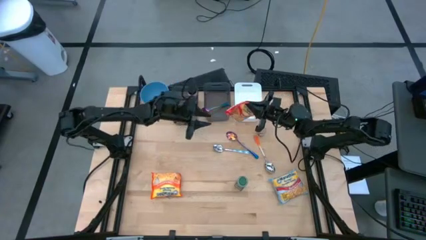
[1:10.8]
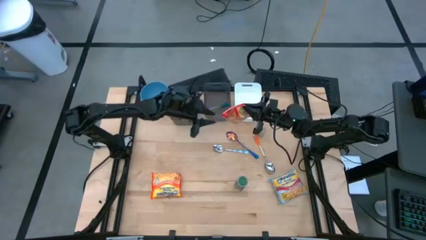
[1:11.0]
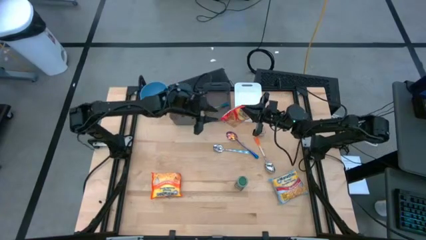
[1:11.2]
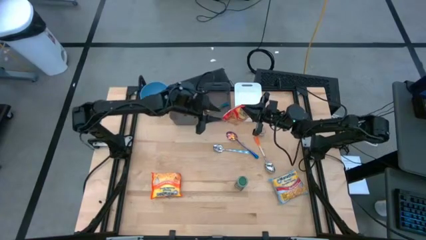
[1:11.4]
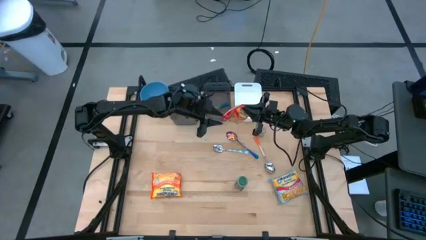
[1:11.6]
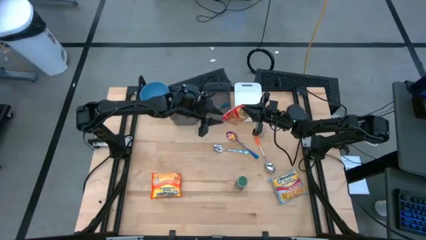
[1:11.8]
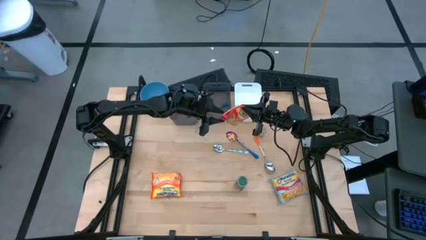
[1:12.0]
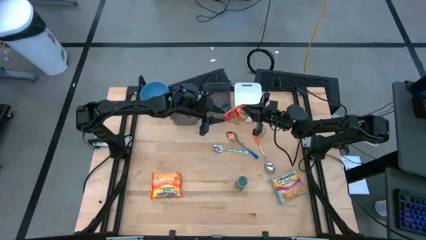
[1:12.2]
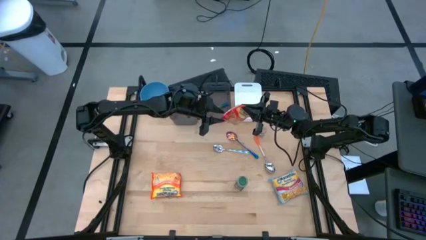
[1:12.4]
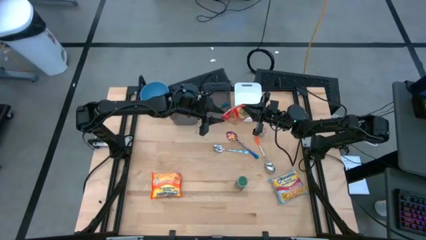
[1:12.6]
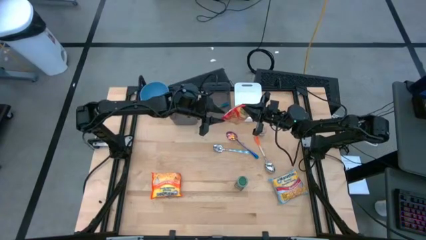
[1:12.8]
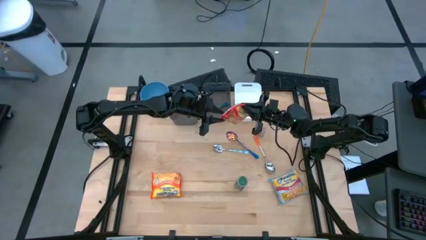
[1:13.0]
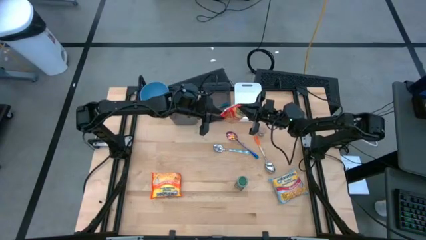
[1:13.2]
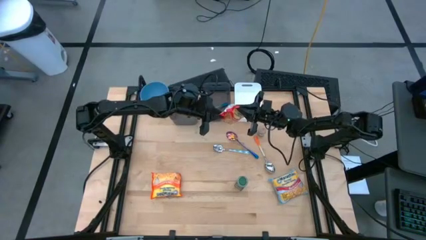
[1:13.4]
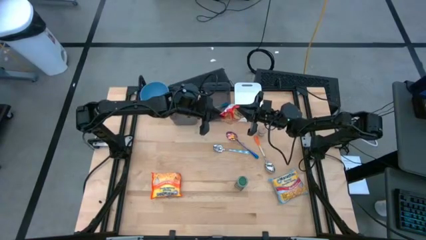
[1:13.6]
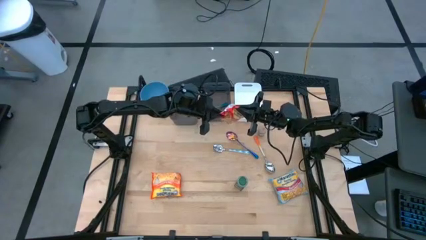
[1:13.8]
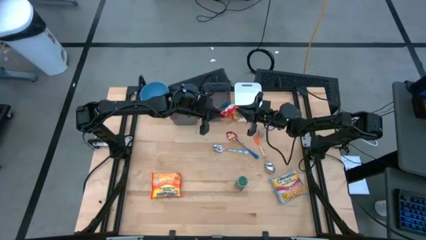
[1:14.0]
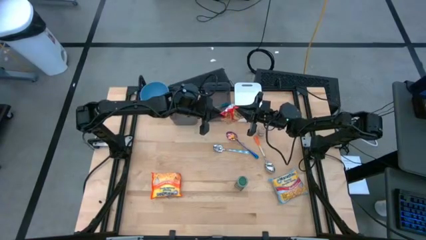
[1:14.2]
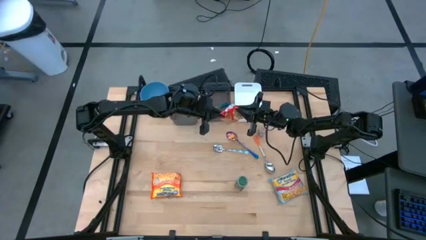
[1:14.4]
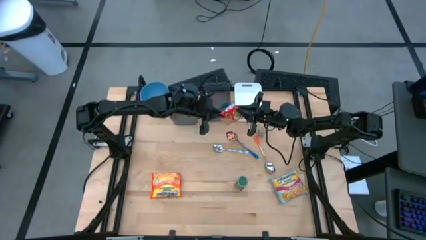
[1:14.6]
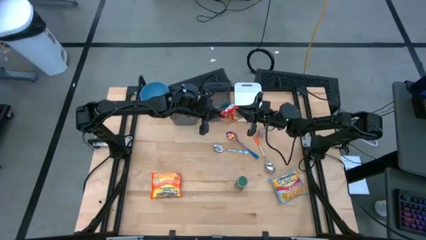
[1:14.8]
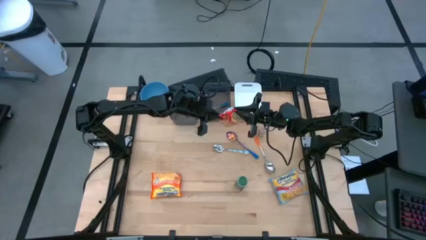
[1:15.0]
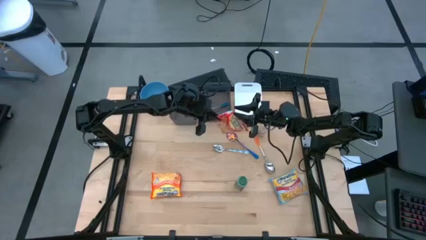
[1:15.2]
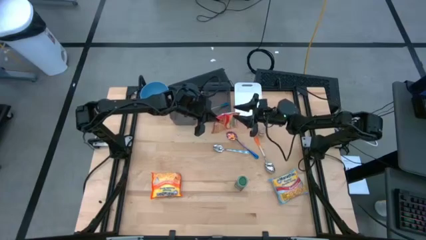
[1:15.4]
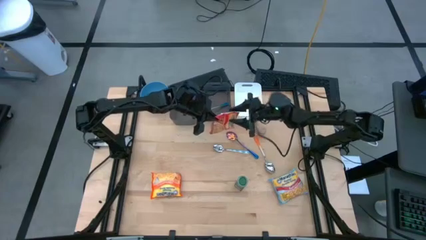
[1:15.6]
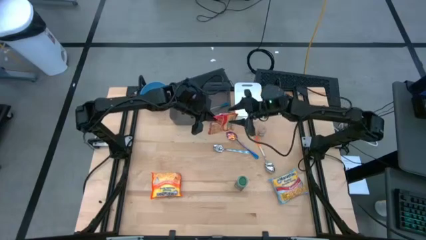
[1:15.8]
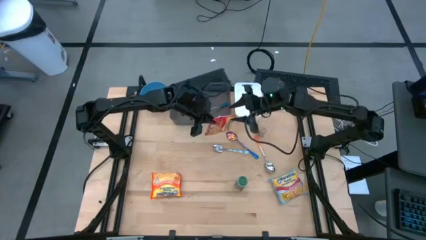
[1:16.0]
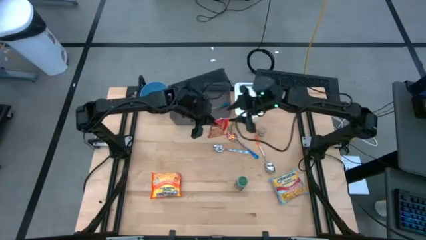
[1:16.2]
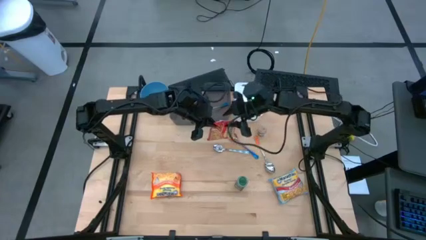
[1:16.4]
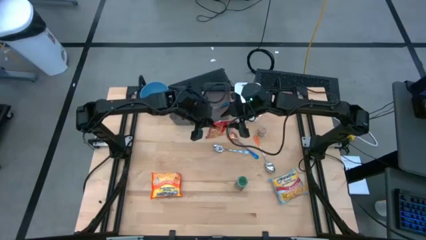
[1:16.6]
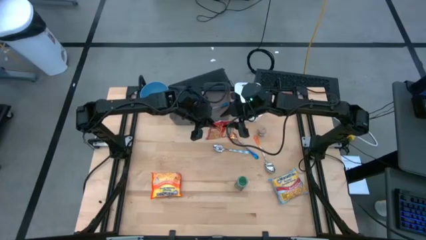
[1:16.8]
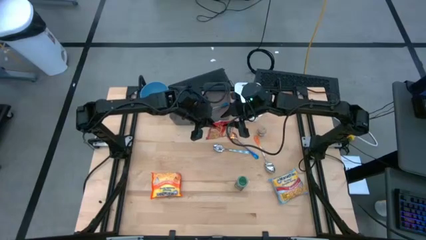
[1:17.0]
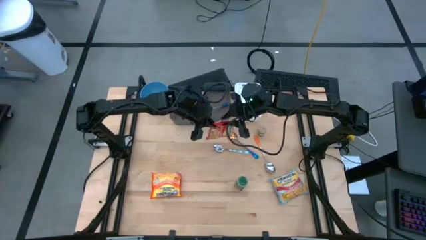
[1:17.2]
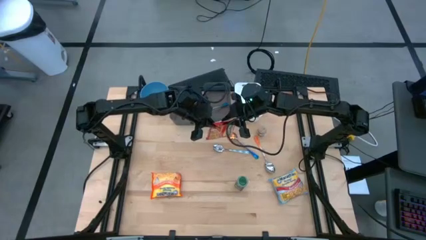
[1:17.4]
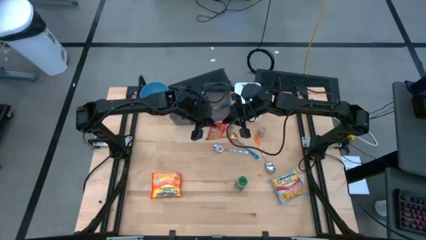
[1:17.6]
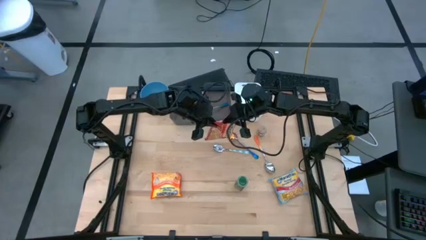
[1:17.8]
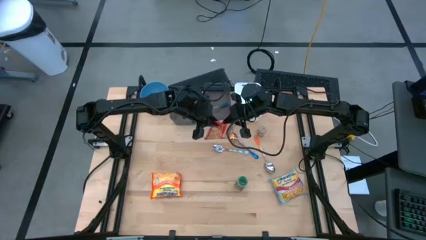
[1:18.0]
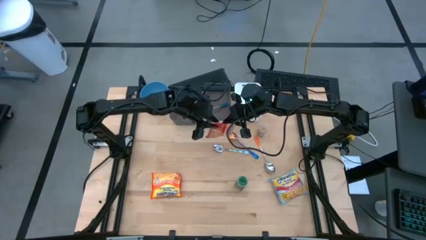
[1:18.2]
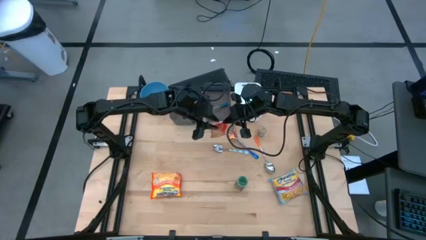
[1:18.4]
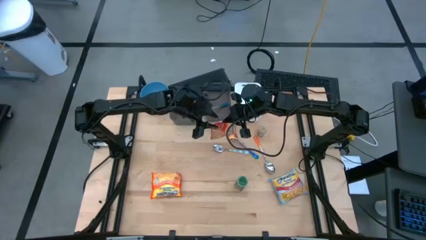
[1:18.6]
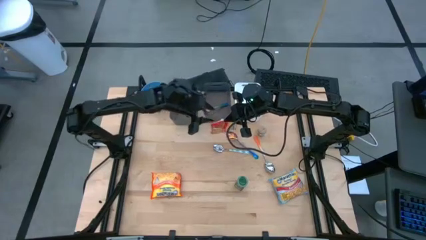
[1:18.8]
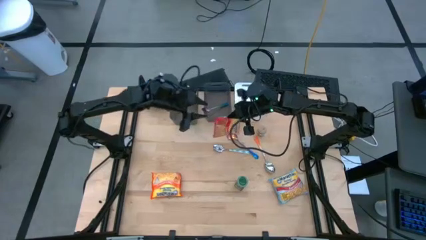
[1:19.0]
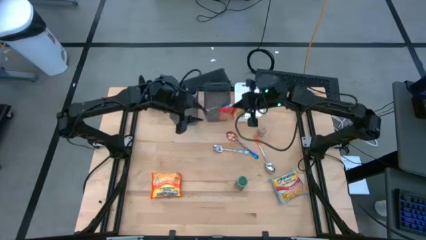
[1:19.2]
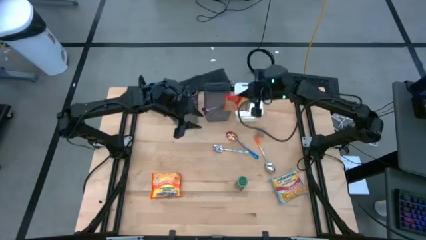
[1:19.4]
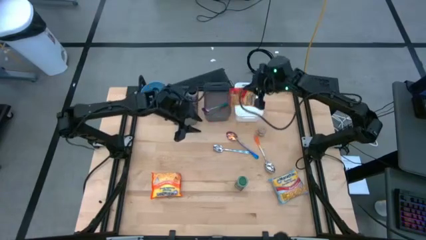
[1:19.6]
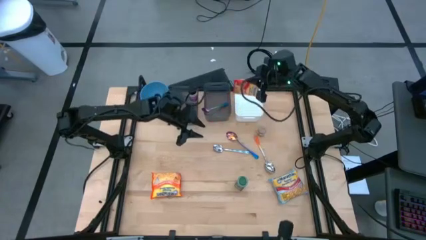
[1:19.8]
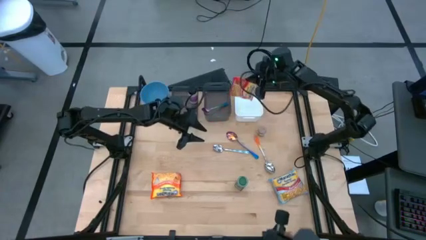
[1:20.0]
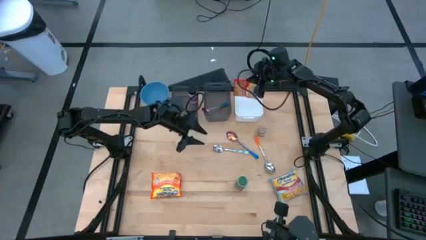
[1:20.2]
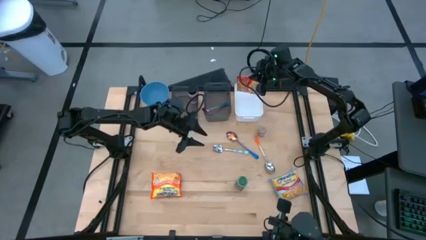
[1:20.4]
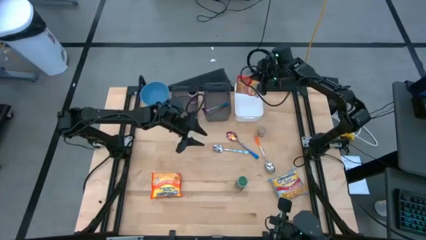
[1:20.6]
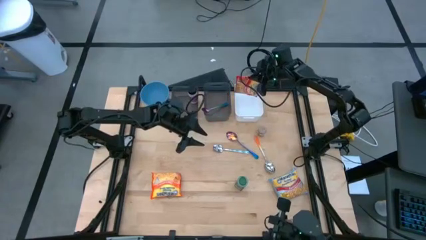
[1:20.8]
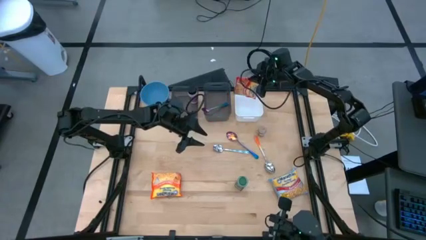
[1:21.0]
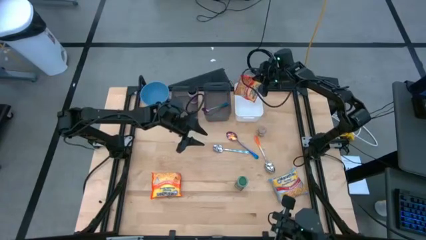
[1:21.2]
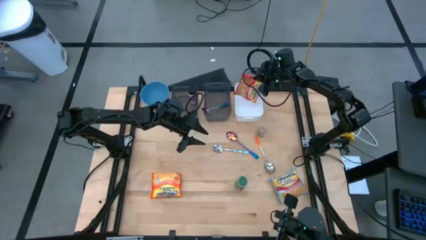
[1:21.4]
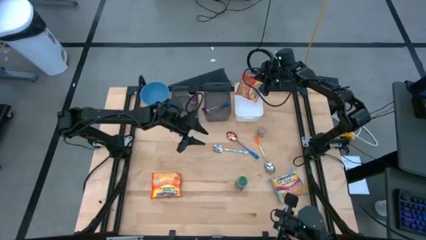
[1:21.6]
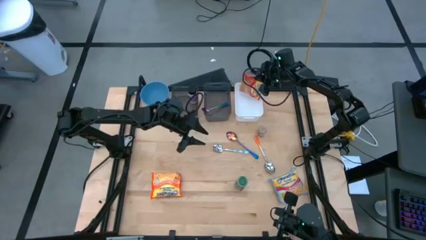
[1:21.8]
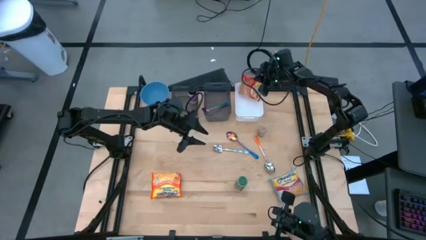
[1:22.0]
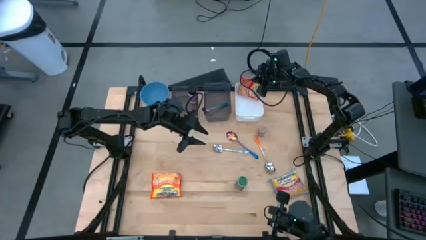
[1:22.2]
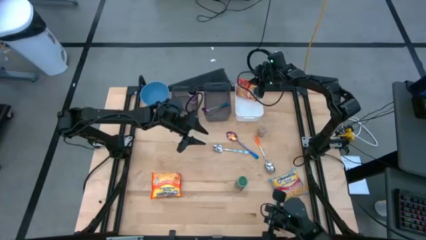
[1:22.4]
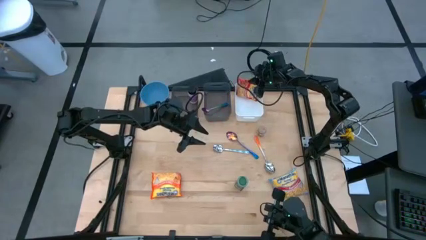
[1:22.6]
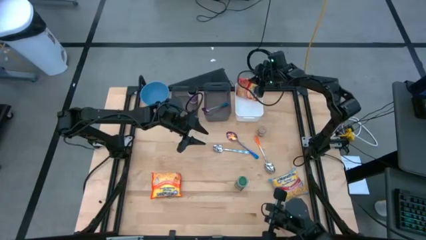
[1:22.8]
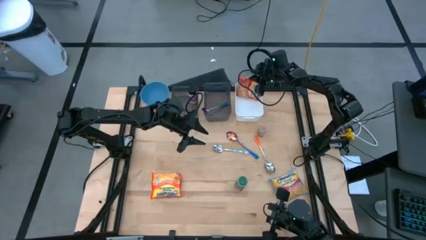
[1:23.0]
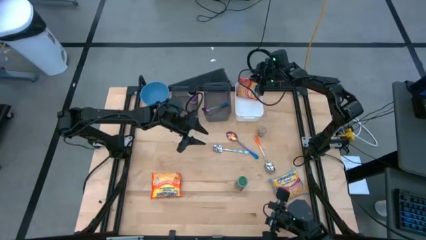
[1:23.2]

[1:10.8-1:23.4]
Task: Pick & Place Food Item
Put the red noodle pack into the white bin

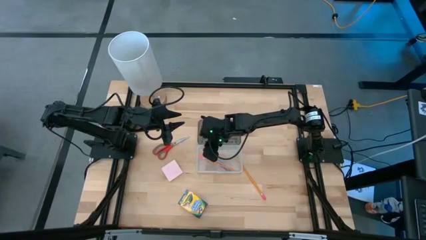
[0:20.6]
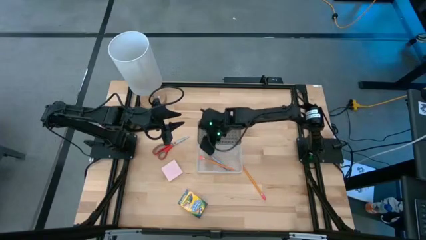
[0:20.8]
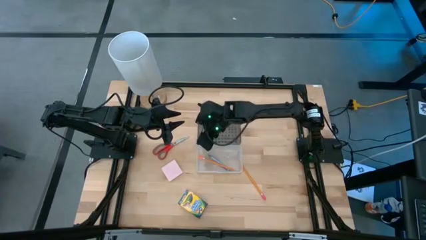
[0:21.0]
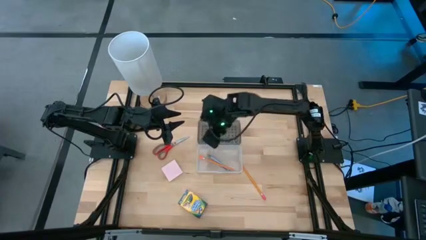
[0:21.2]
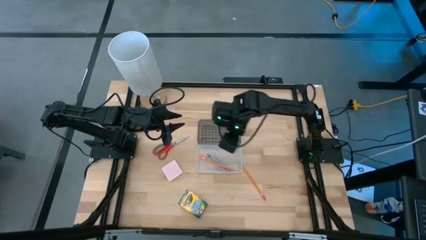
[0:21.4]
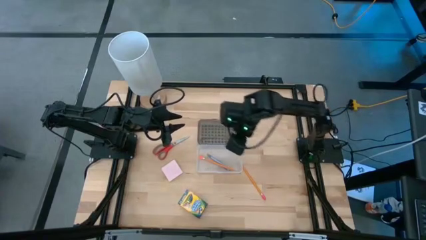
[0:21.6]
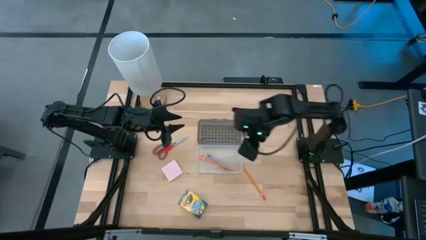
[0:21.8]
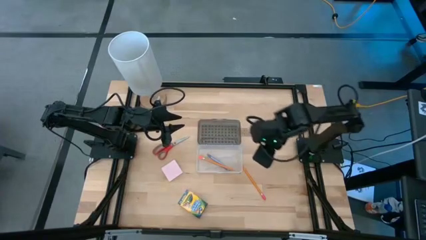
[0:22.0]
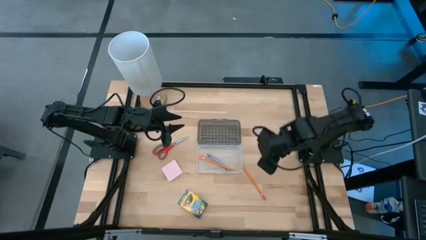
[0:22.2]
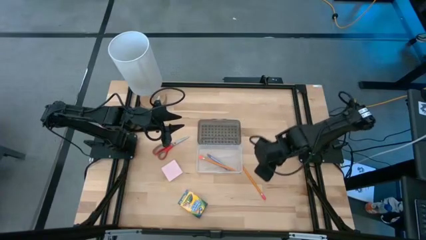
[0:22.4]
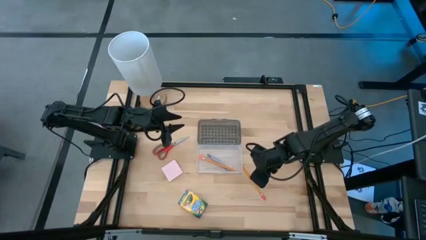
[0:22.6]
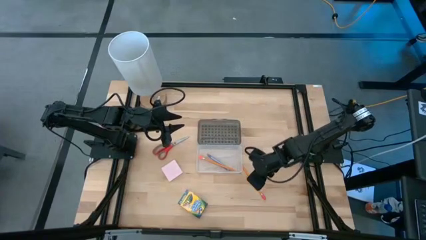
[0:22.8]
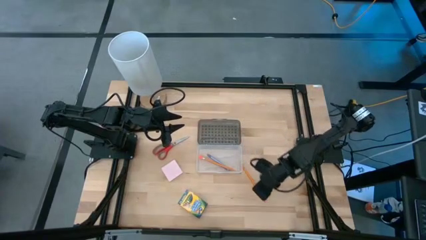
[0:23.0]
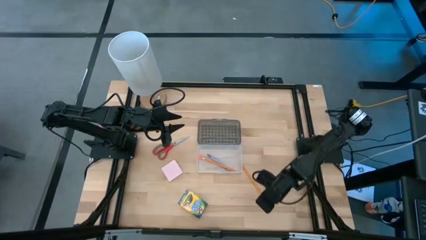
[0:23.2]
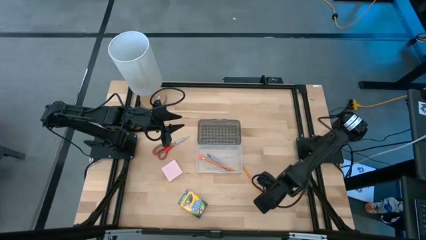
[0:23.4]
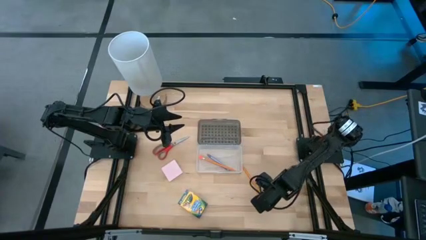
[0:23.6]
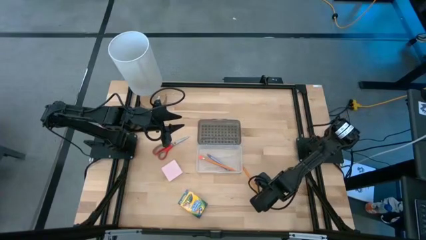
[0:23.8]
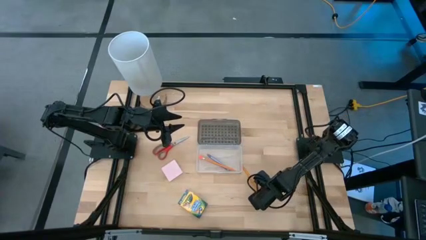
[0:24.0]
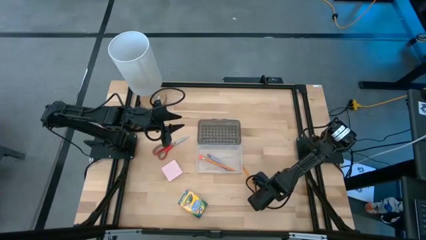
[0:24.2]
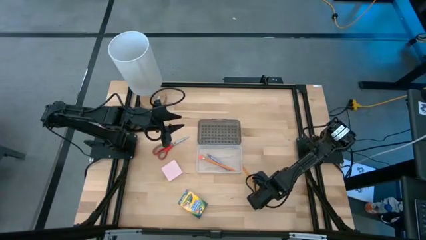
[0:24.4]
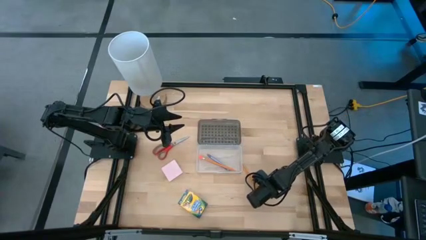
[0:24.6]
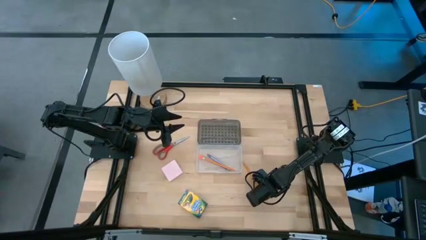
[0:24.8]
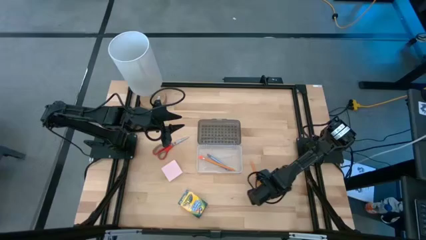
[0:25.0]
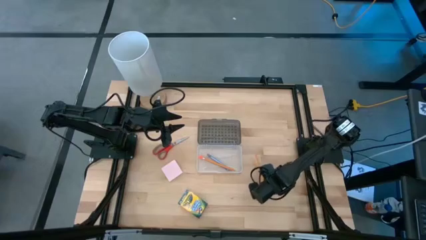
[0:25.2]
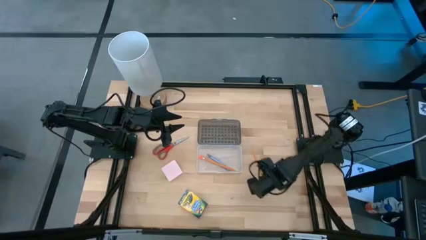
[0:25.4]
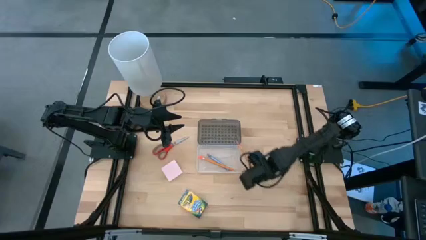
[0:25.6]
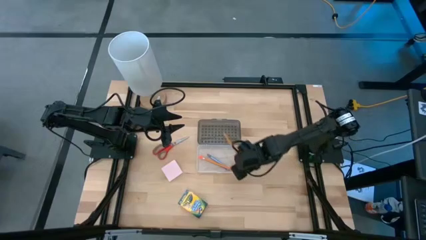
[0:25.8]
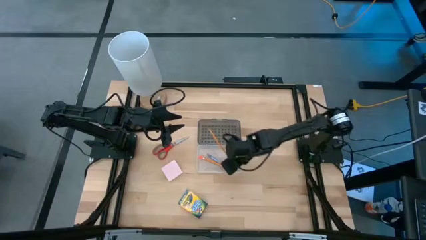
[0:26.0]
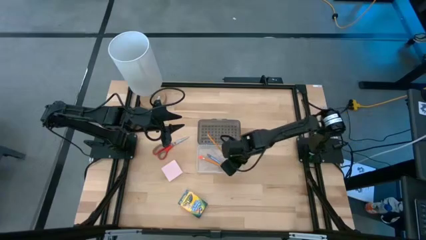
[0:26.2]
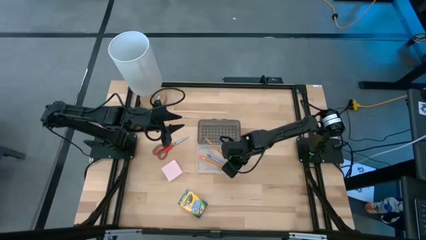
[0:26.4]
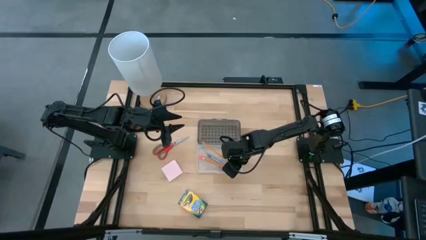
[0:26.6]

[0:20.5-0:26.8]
Task: Pack school essentials
Put the orange pencil into the transparent supply box
